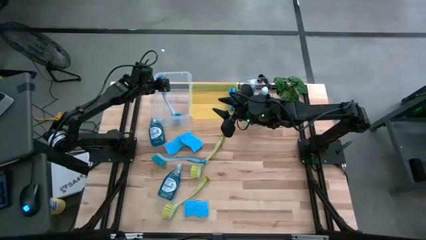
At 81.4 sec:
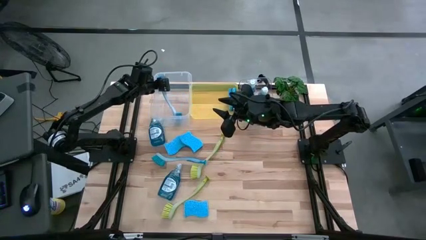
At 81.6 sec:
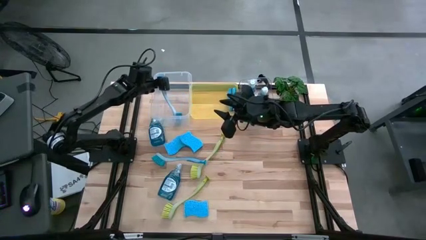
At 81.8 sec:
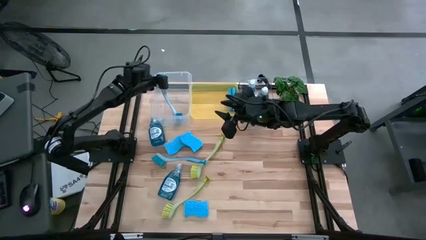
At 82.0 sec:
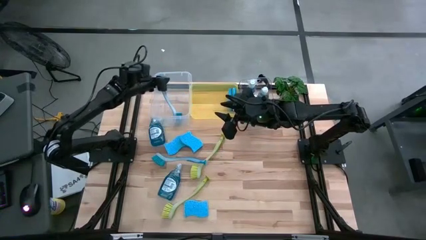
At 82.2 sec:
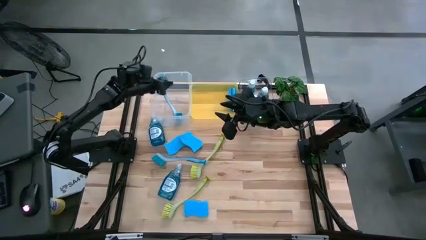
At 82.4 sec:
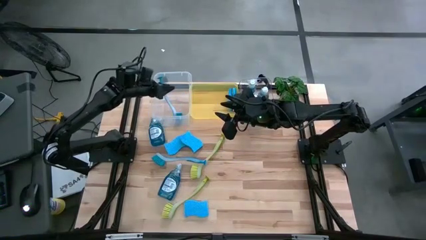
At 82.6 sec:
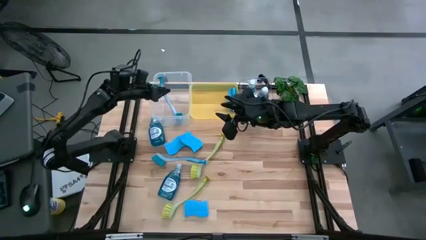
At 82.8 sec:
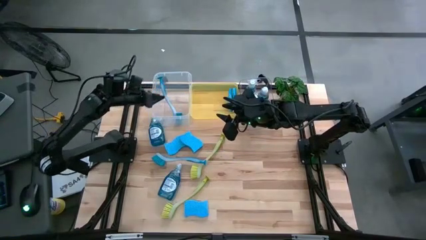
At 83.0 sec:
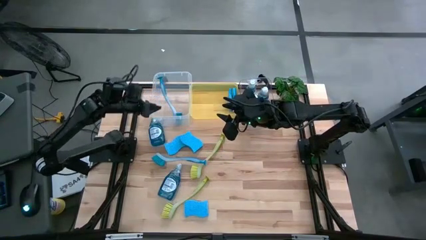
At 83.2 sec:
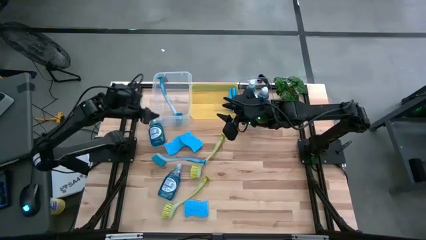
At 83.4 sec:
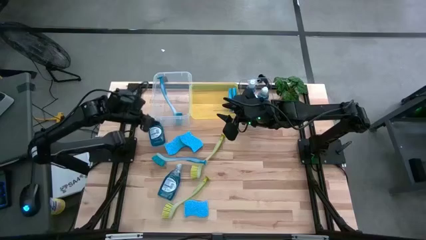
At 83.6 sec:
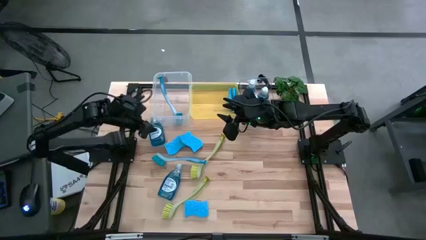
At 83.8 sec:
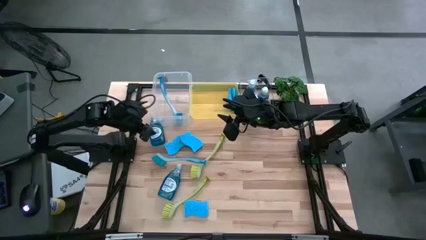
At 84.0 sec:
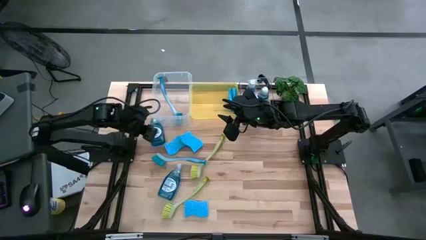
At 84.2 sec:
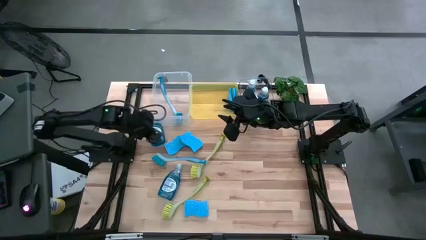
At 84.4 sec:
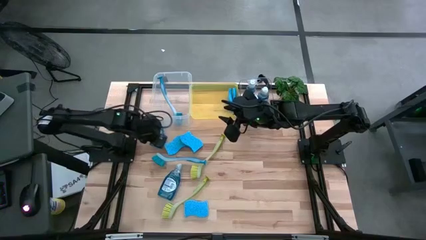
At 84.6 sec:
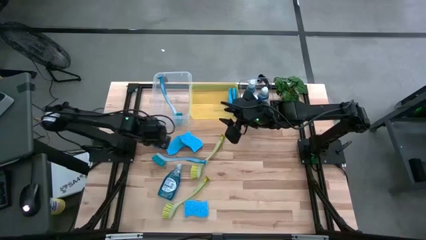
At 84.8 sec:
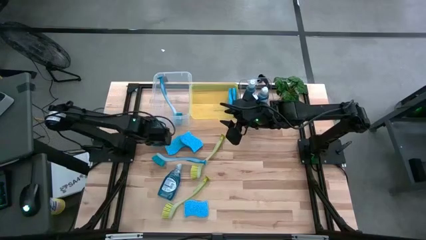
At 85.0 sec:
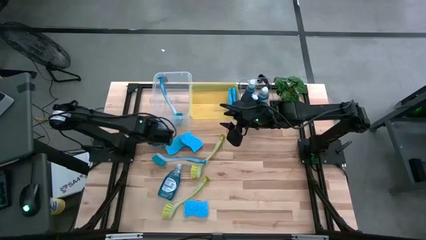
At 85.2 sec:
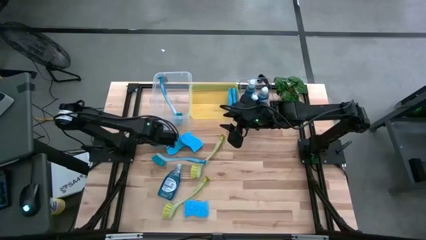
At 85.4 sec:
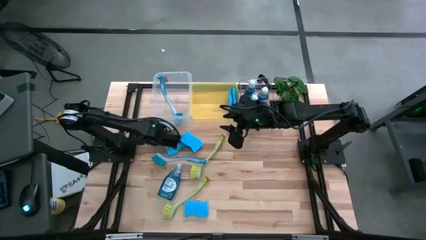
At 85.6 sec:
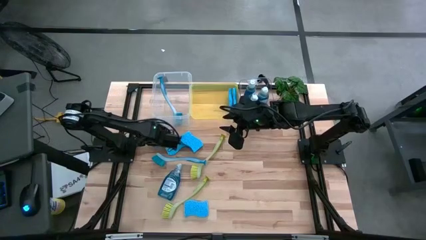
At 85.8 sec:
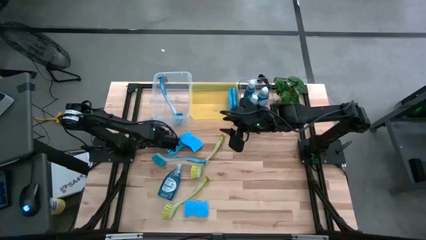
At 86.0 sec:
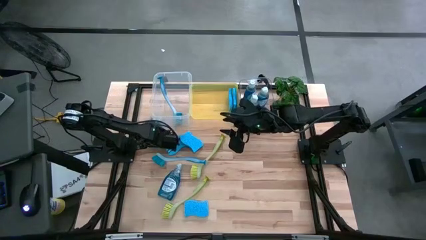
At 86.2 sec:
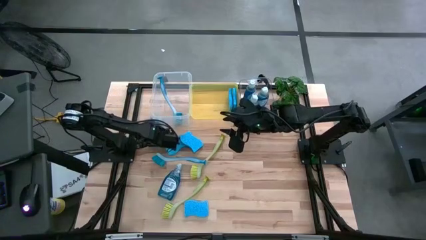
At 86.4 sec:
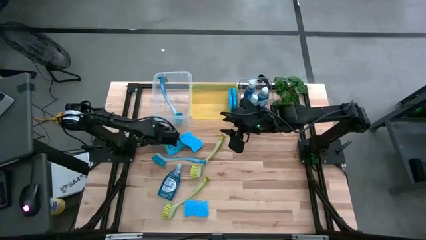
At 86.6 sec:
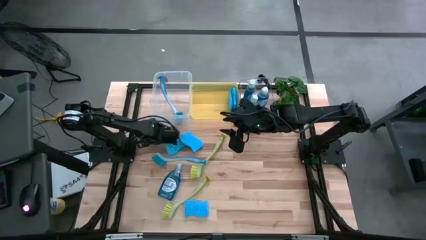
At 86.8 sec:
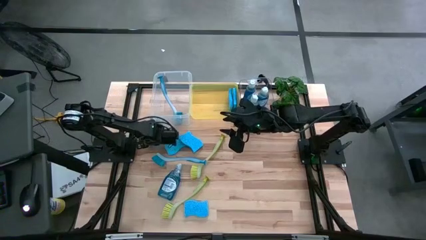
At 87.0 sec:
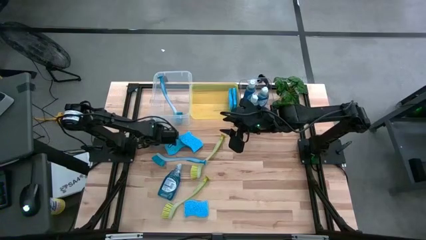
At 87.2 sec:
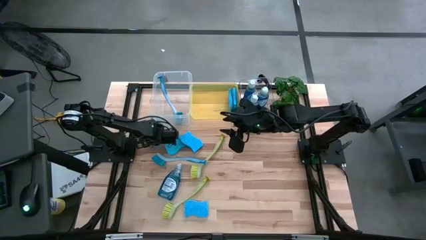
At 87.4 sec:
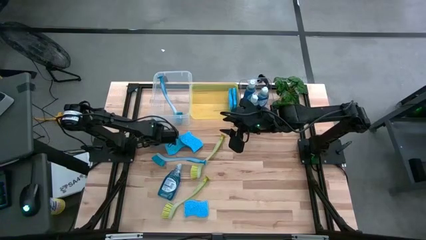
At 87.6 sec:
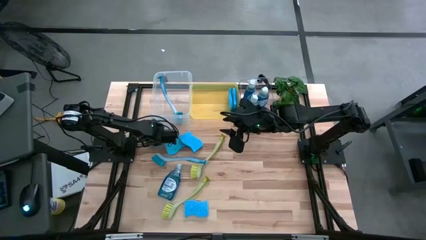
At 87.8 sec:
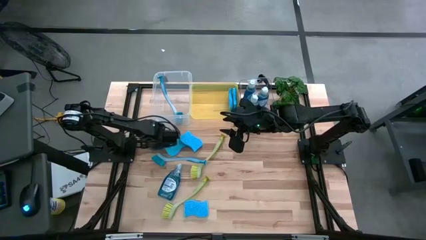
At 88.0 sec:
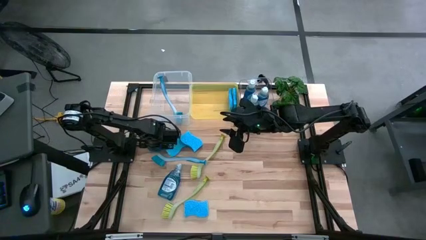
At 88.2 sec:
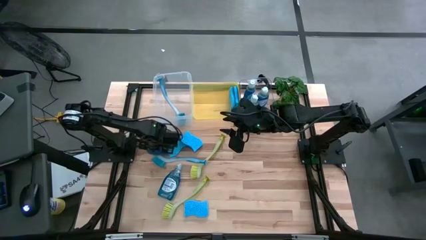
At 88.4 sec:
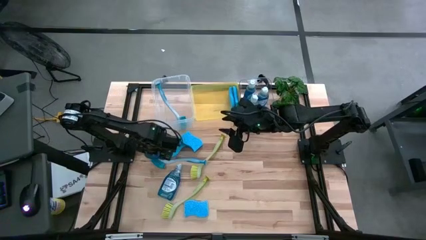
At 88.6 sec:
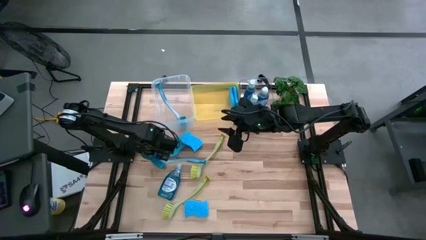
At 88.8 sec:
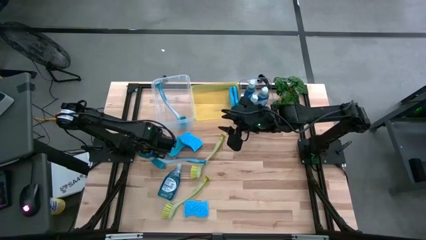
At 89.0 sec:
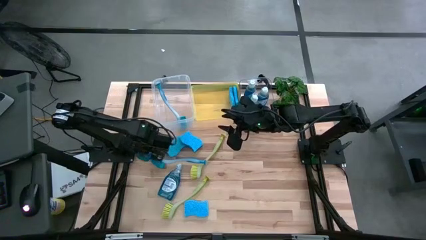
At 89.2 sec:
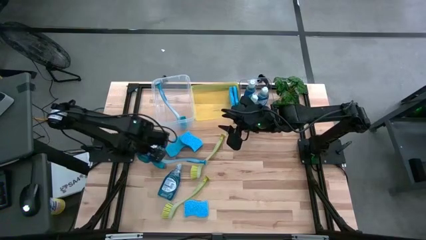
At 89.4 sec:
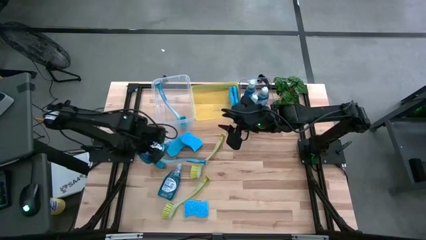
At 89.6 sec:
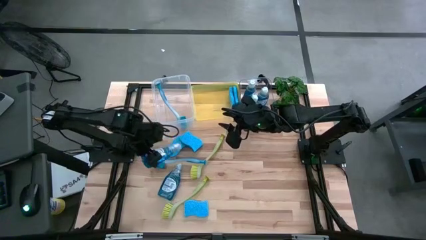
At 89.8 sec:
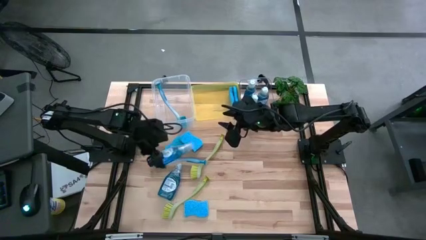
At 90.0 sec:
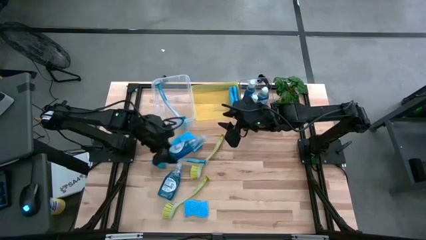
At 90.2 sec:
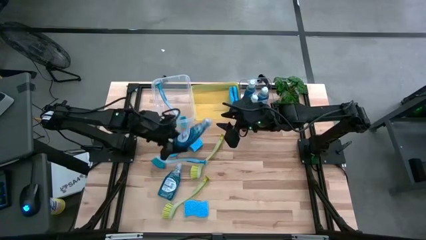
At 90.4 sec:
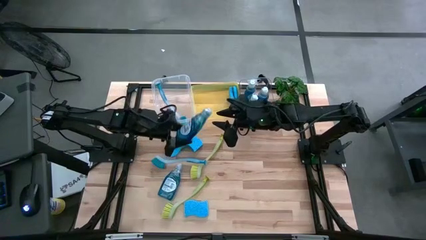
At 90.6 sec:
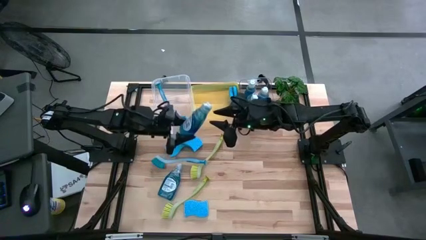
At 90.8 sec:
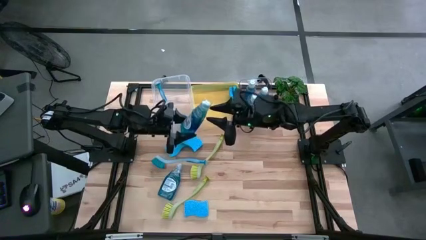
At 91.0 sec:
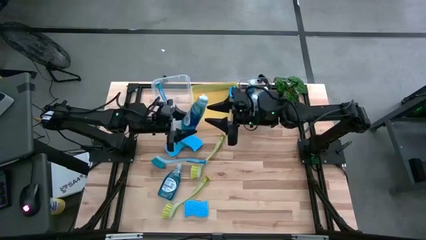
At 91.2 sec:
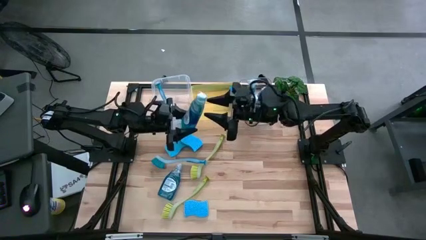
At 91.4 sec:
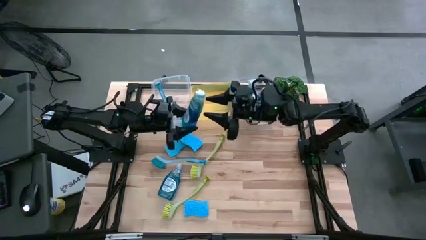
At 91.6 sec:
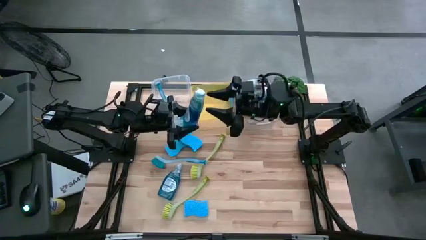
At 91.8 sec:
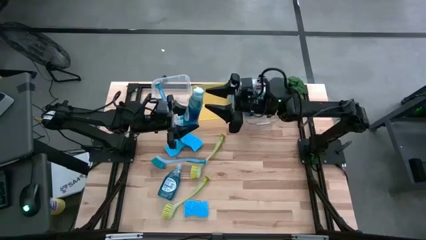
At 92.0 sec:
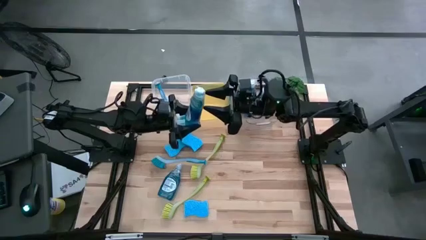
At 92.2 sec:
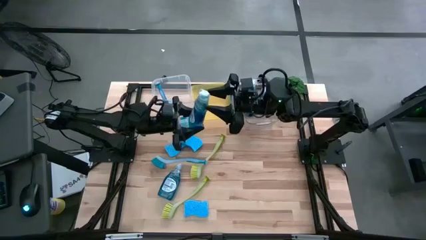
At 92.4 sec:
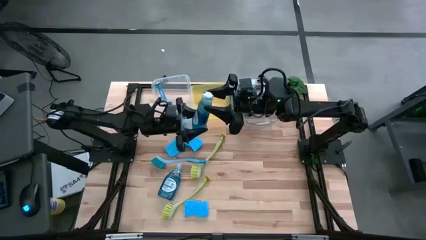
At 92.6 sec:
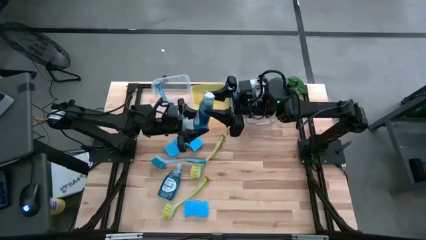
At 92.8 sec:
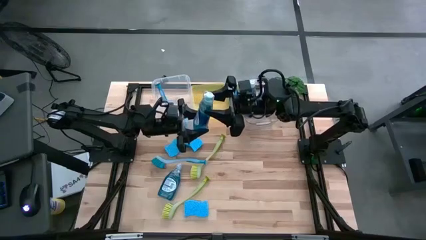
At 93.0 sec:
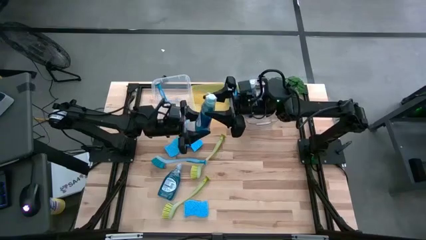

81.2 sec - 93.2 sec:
Task: Pick & Place Kitchen Sink Supplies
Put the blue dishwasher liquid into the transparent bin

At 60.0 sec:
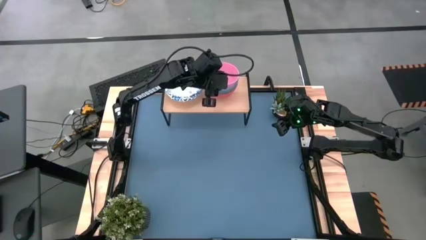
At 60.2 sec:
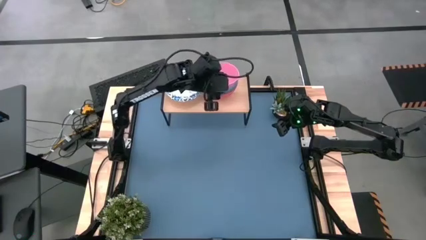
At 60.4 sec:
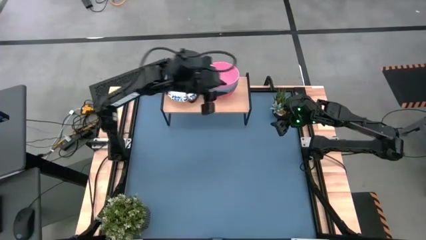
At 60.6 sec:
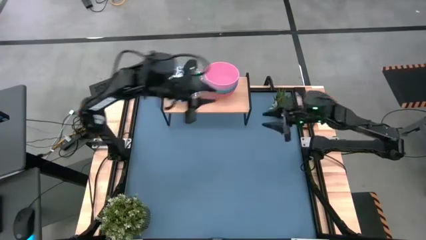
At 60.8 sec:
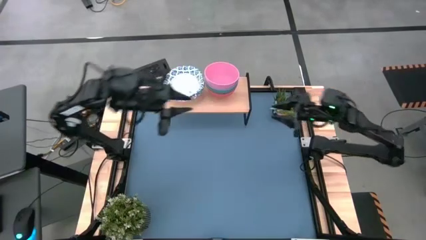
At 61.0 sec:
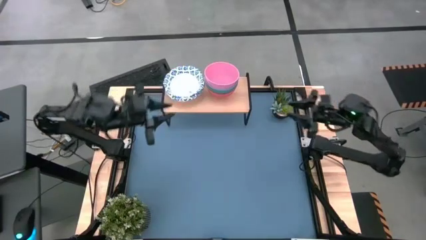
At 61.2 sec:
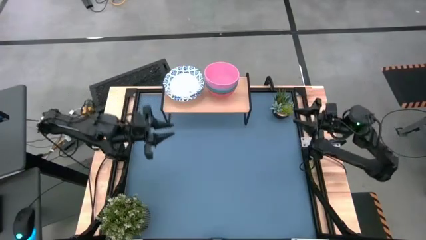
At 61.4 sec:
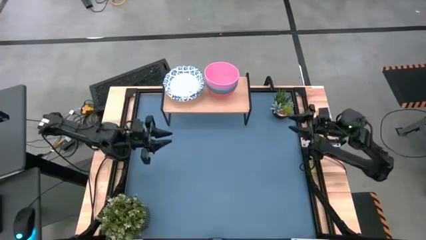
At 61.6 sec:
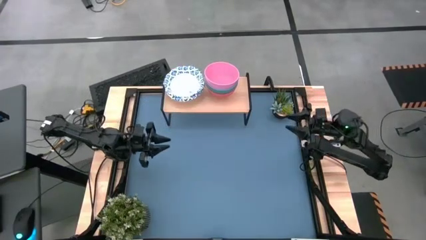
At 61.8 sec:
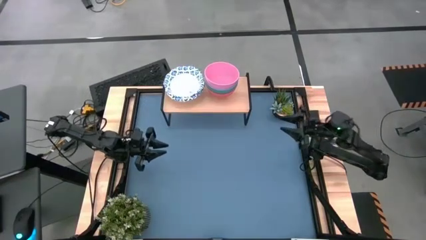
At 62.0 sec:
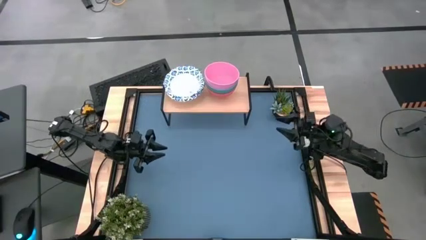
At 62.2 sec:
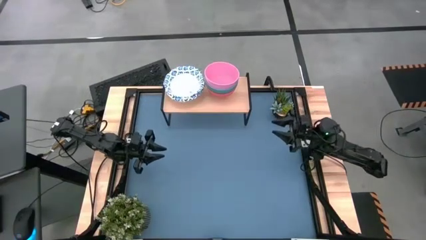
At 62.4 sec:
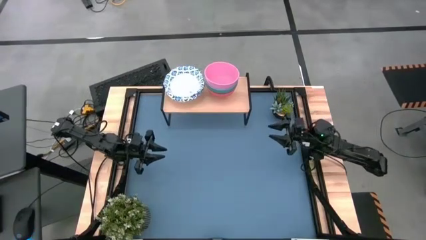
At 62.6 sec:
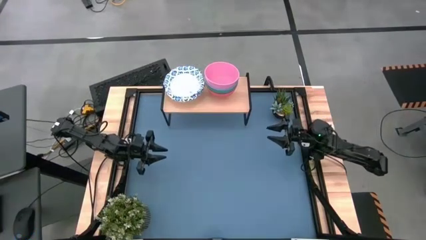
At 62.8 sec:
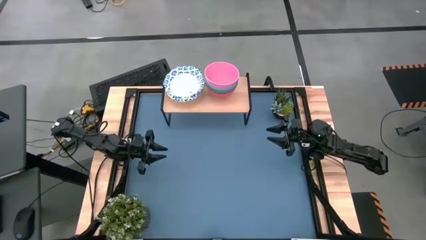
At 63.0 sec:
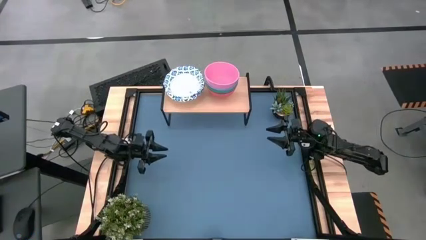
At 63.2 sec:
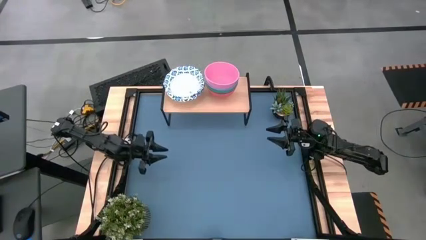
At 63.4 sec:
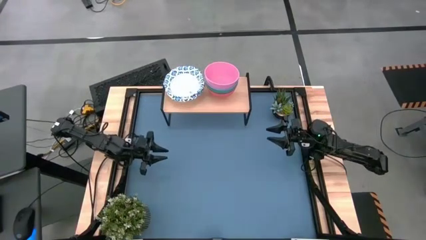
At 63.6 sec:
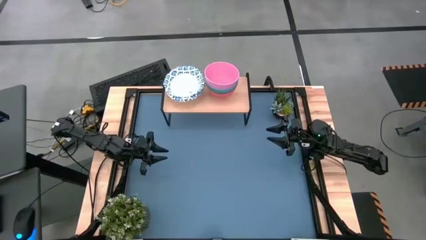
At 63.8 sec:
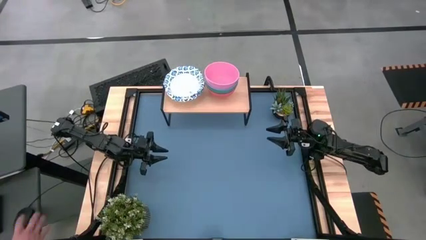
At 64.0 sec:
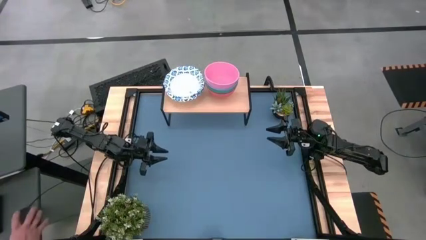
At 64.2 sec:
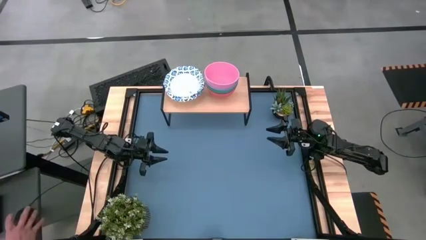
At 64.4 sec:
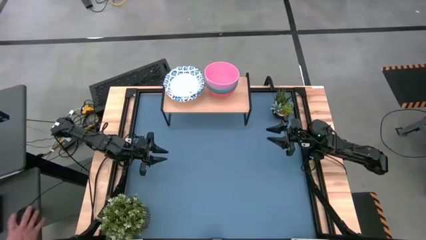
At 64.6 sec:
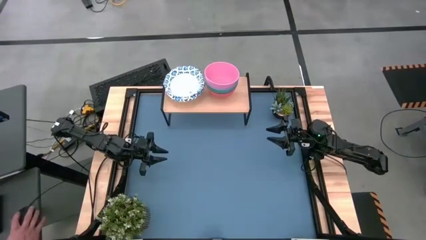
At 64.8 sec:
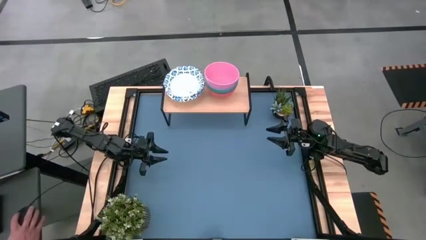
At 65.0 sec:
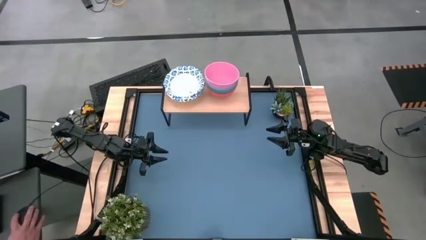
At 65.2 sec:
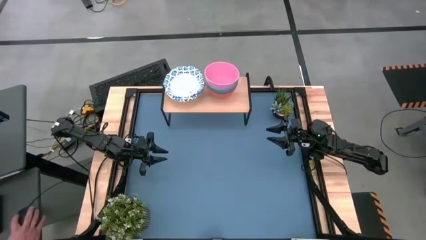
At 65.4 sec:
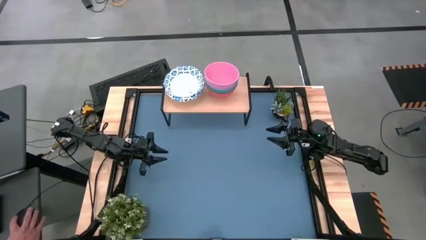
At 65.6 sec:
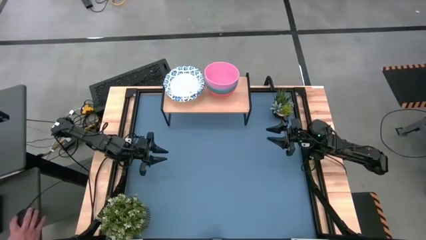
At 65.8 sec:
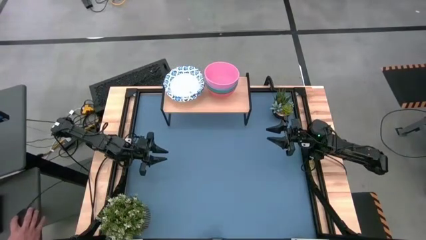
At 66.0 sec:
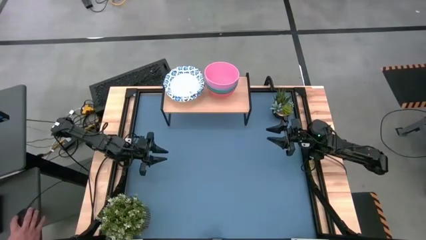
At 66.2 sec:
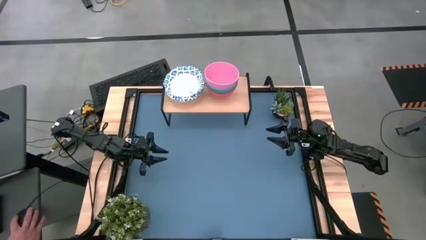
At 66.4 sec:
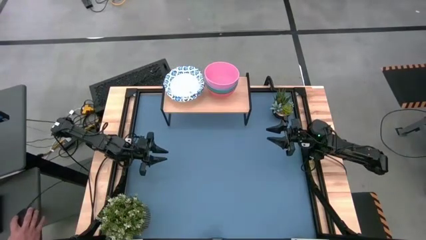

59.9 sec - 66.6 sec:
Task: Place and stack bowls onto a shelf
Return to Home Position
